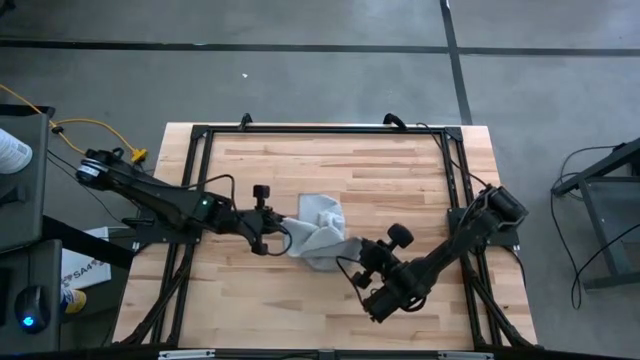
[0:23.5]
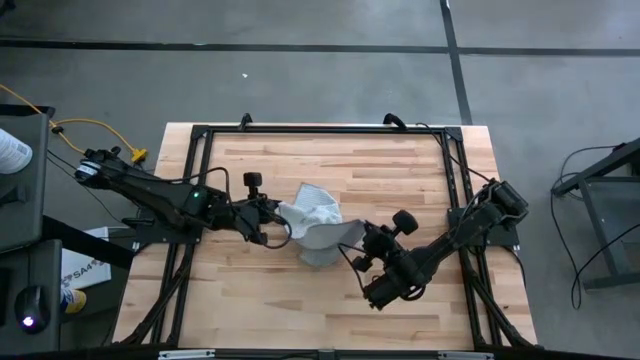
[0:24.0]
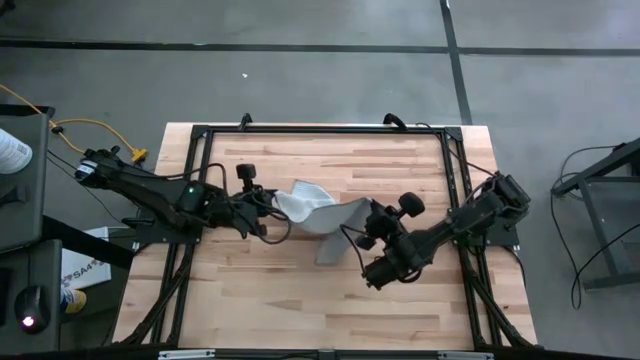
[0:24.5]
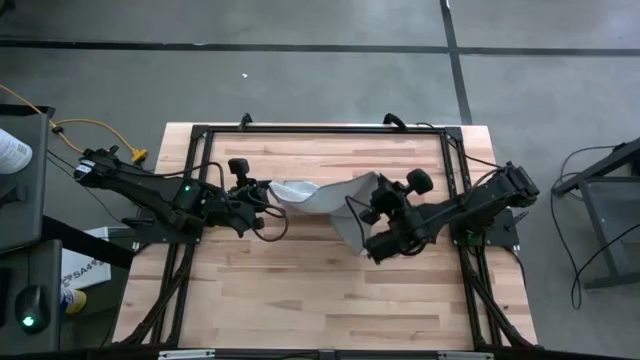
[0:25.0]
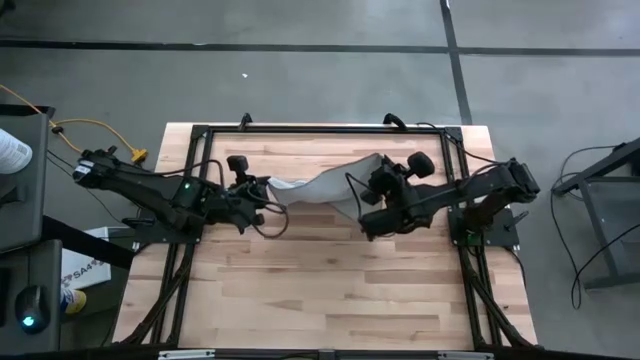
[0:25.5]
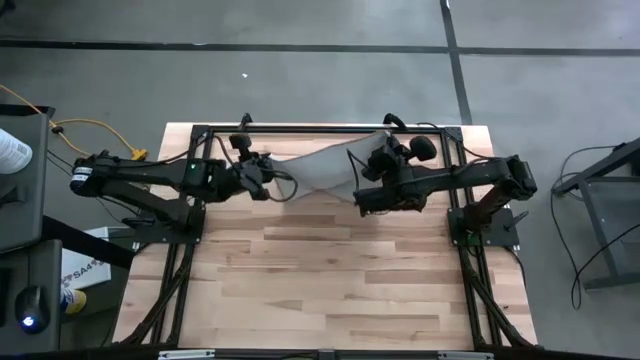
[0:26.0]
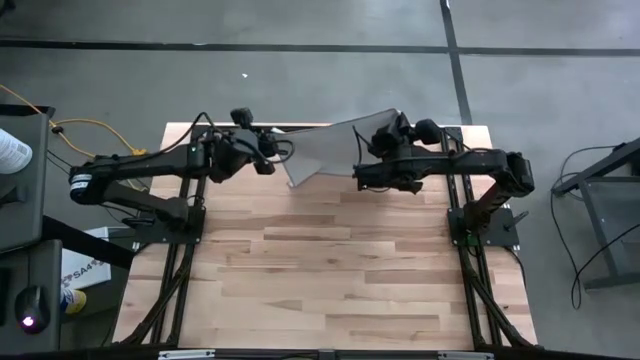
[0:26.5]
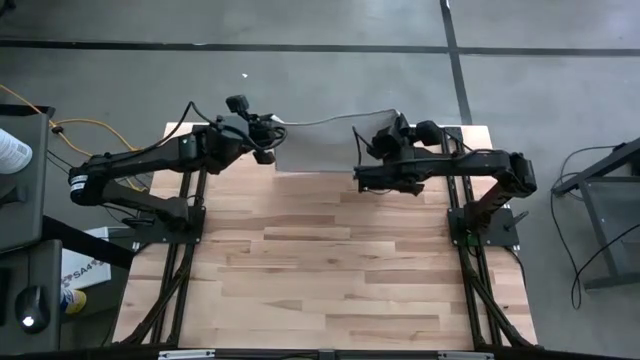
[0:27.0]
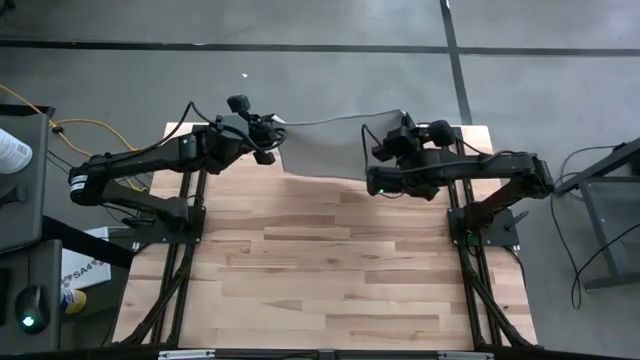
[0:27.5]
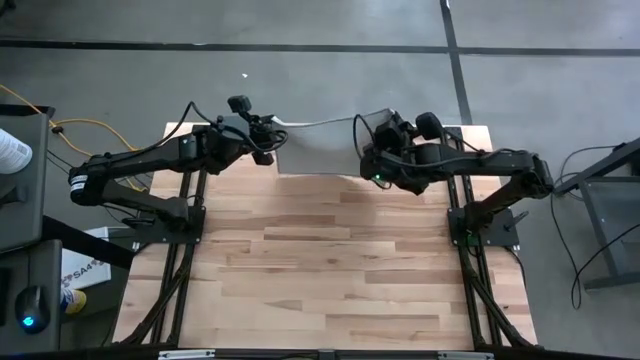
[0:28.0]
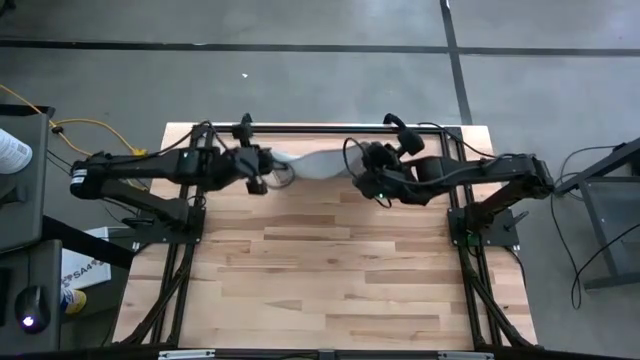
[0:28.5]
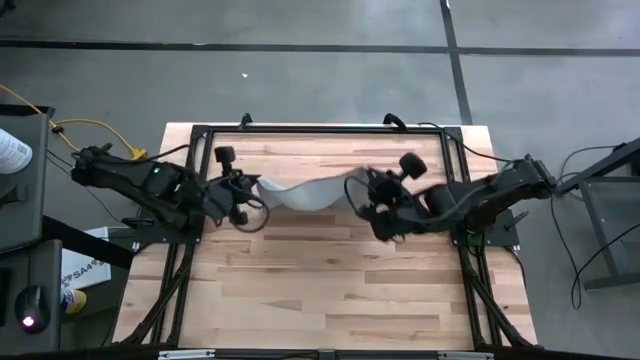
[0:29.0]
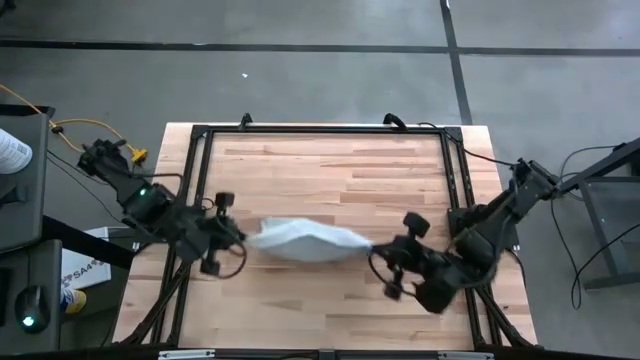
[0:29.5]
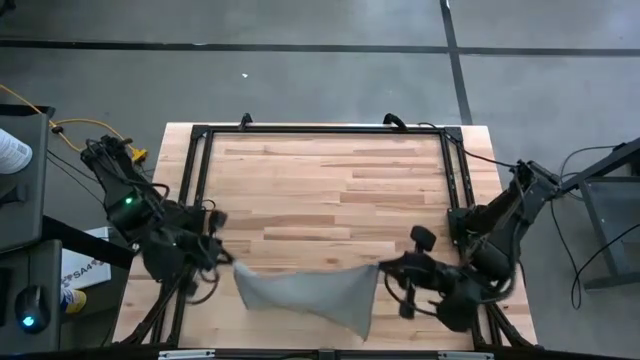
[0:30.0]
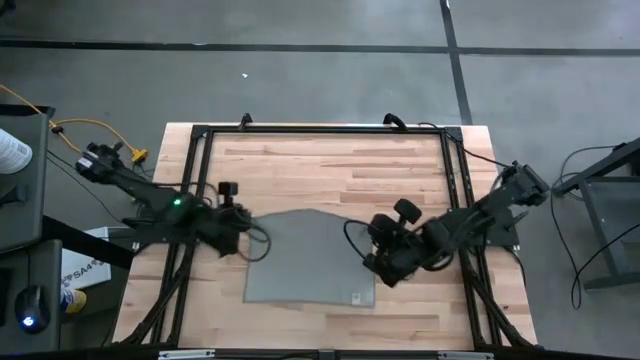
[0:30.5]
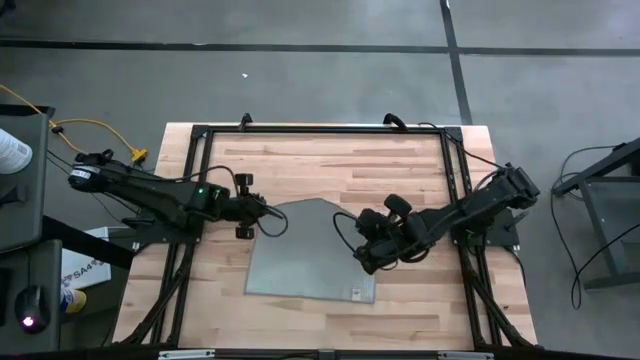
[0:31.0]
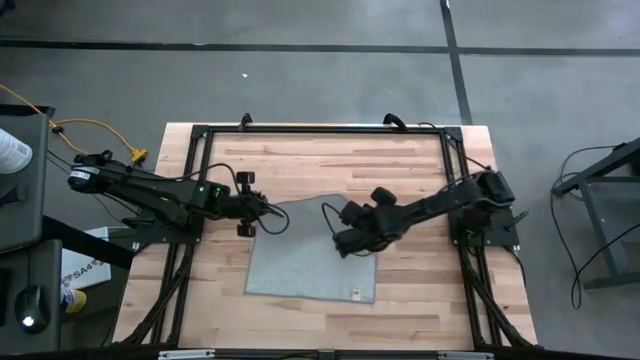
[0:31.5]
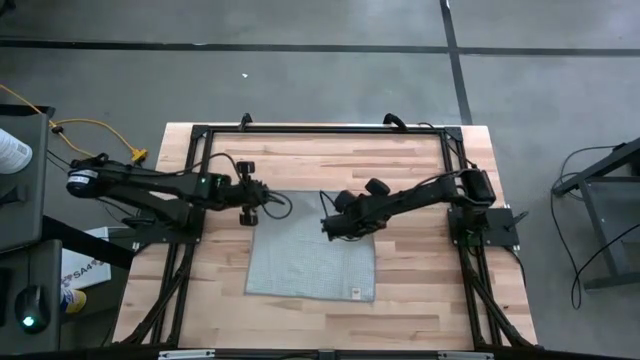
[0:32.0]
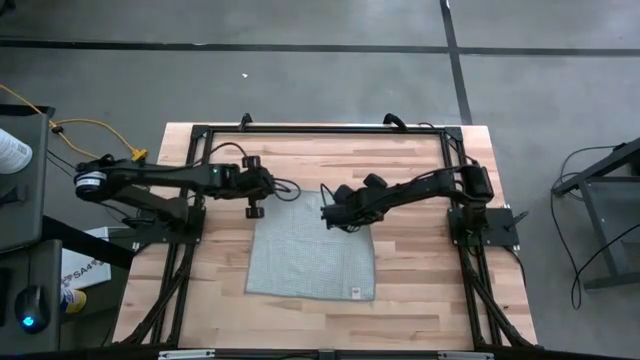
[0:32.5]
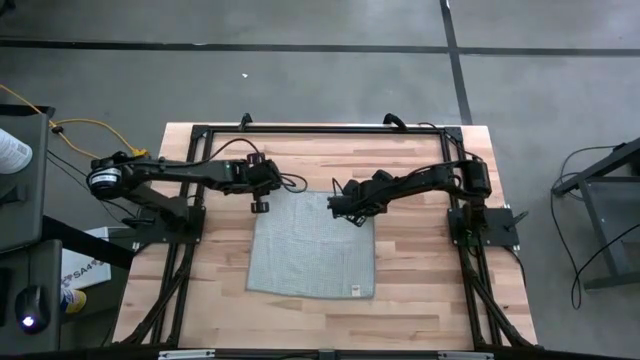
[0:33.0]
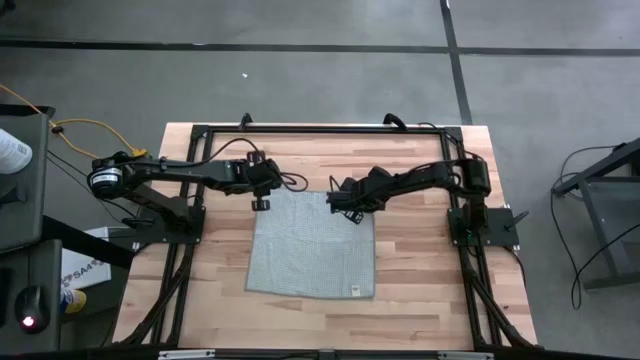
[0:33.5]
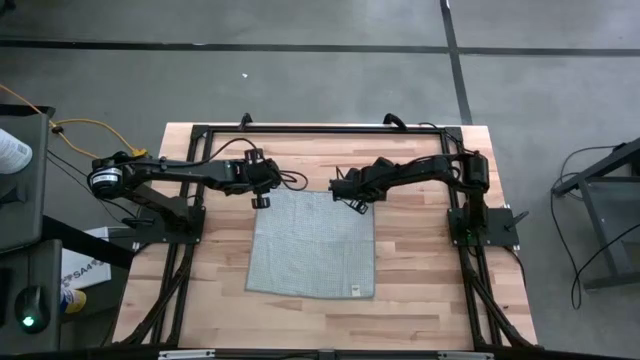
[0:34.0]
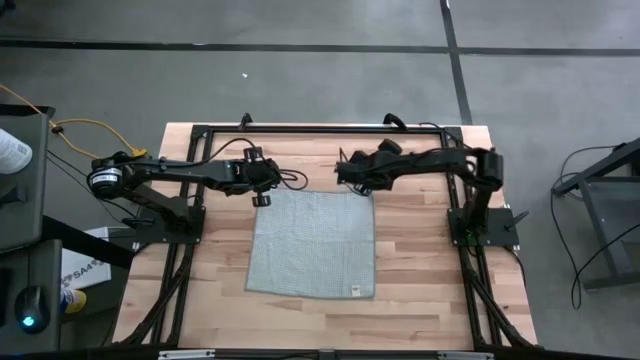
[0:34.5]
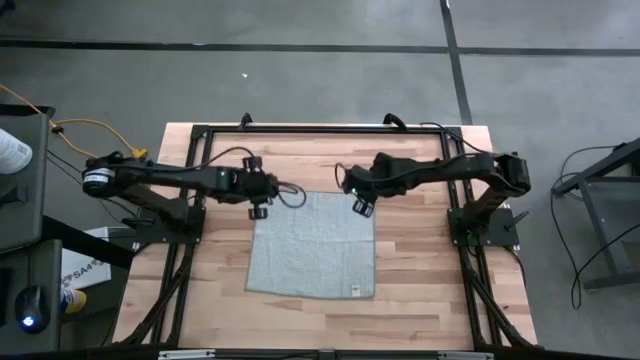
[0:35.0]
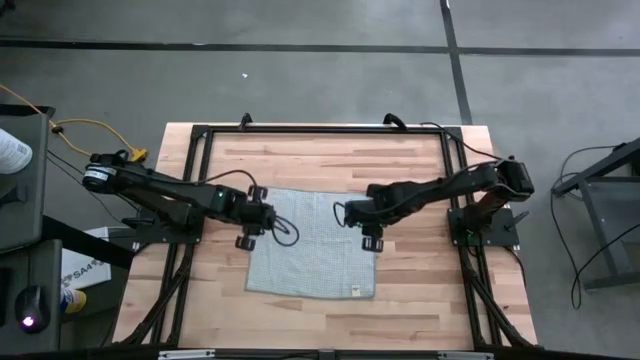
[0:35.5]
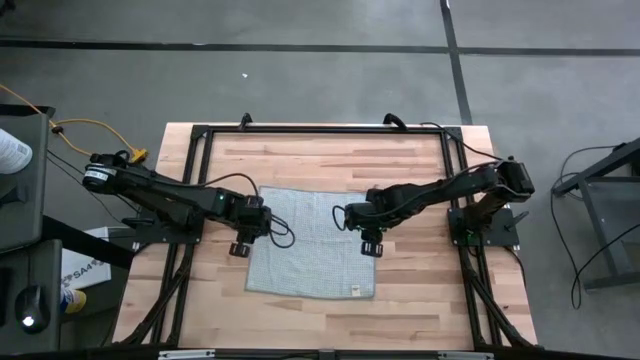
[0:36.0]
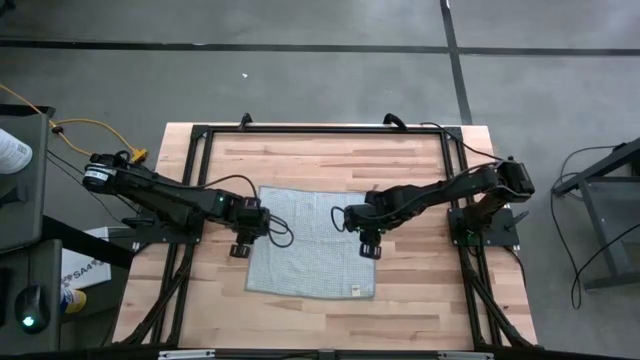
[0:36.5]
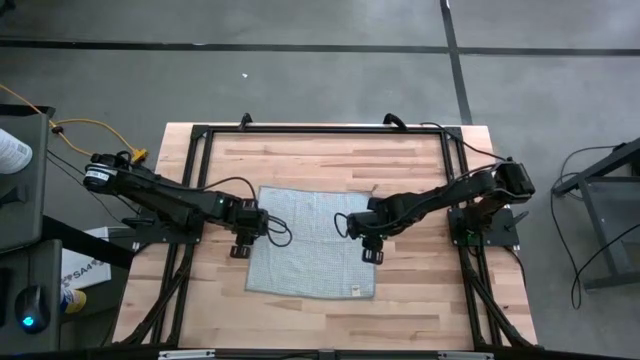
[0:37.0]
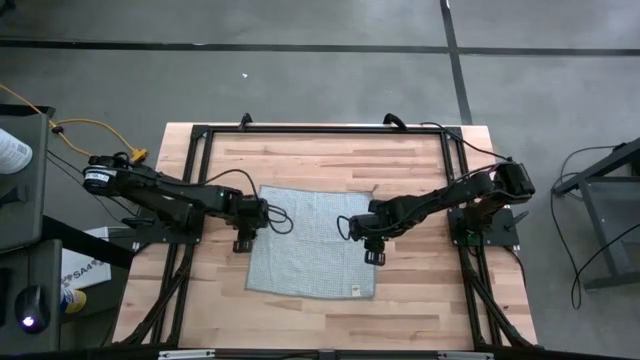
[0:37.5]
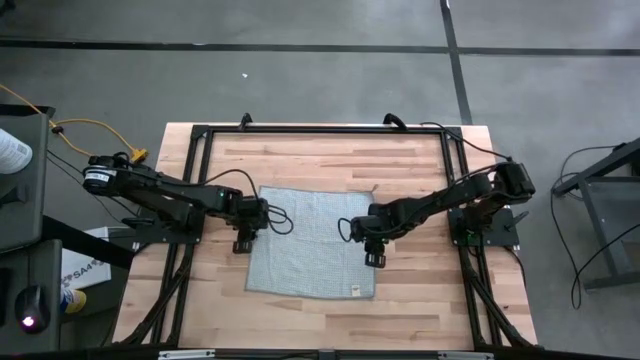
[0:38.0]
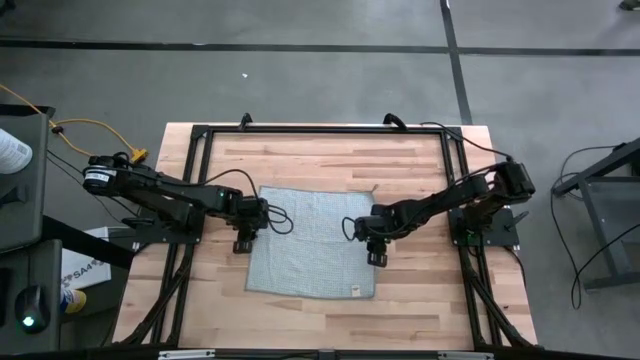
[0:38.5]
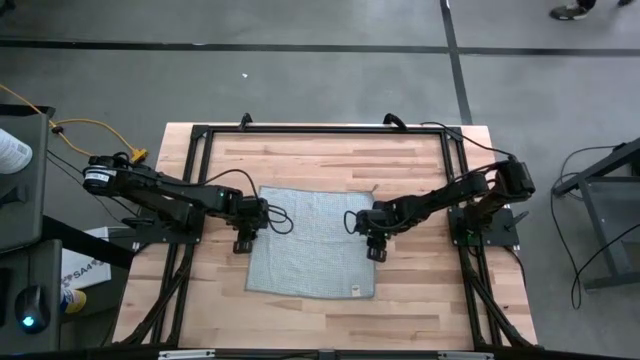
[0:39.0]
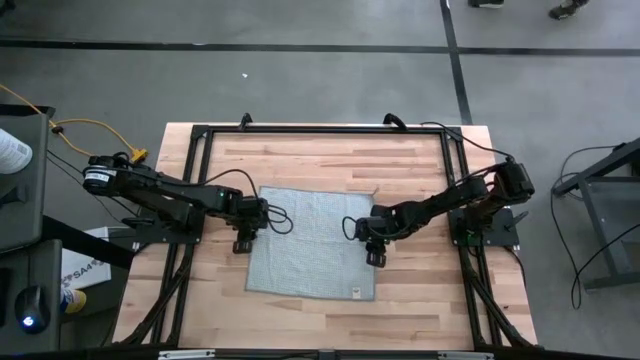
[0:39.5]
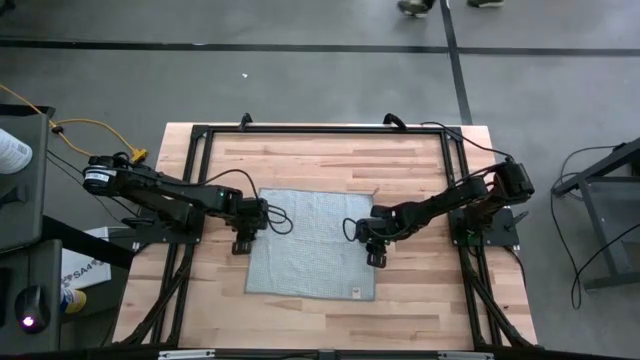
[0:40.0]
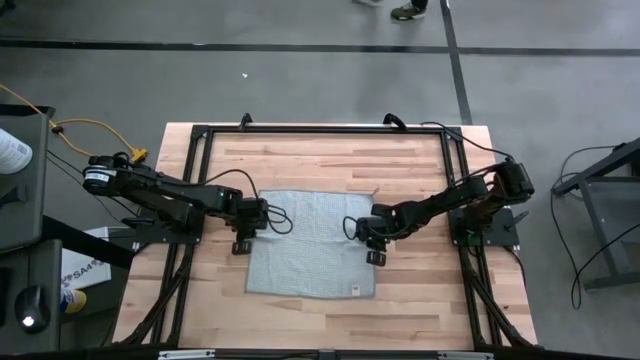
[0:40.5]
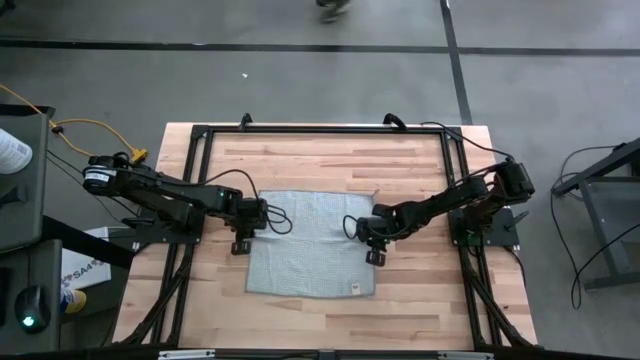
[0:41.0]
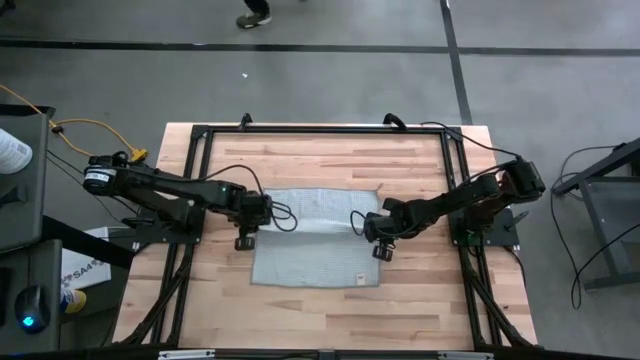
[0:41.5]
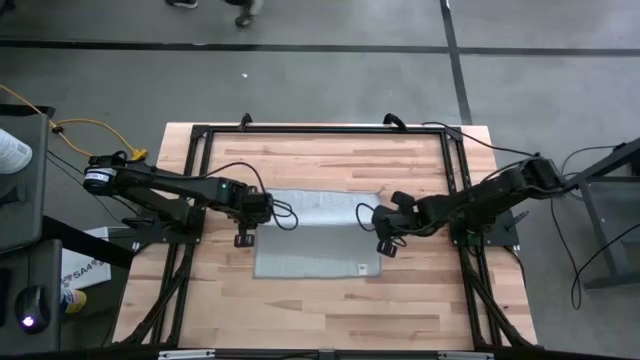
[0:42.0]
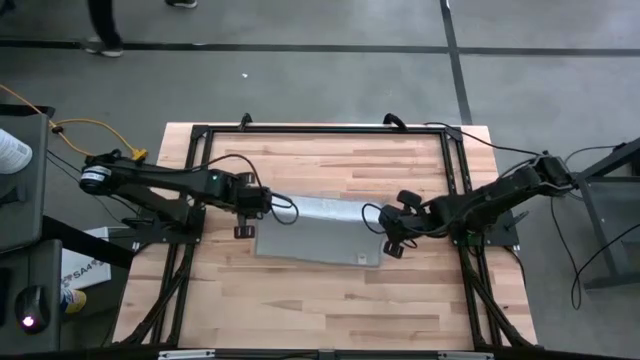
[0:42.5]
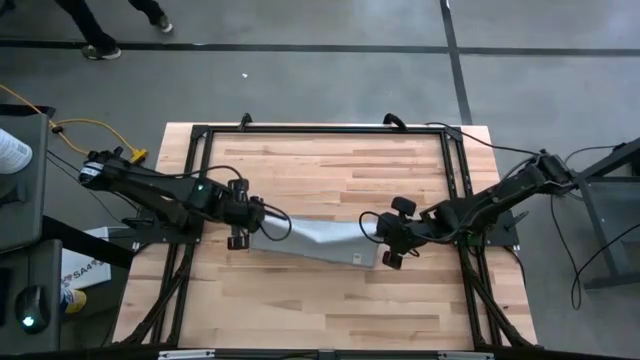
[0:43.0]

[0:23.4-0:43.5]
Task: Fold microfiber towels
Fold the gray towel
